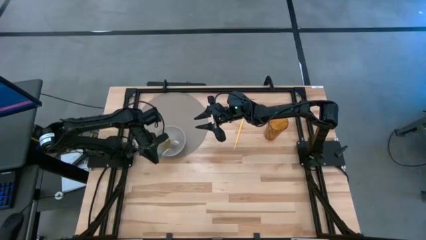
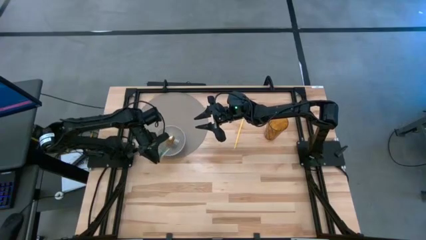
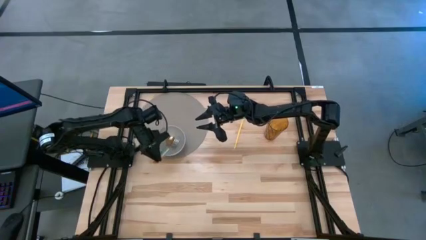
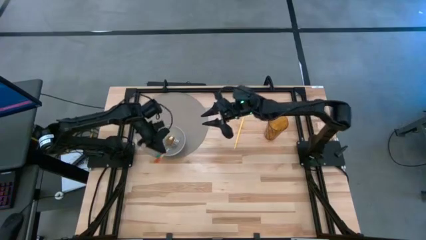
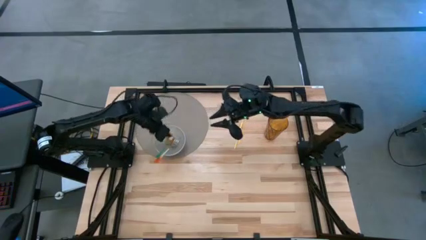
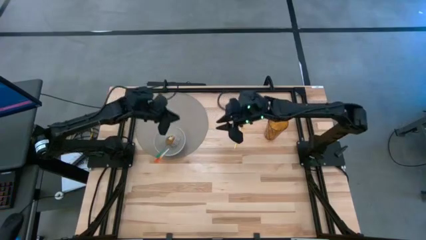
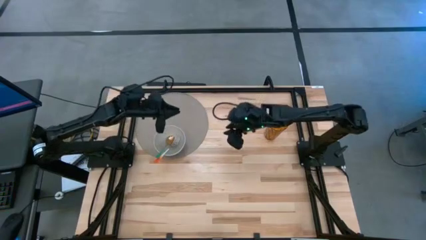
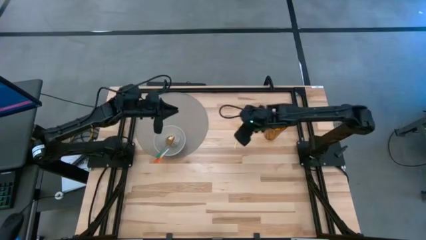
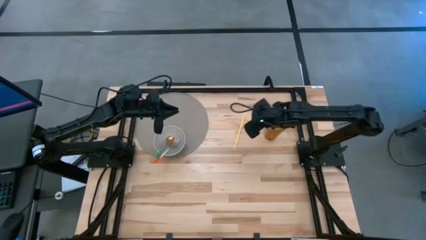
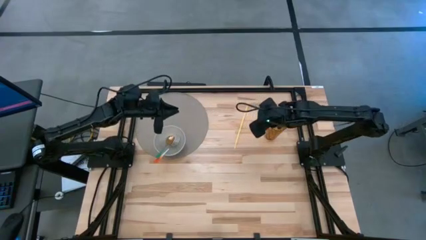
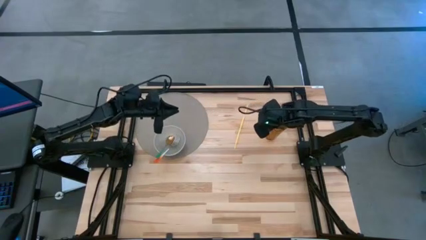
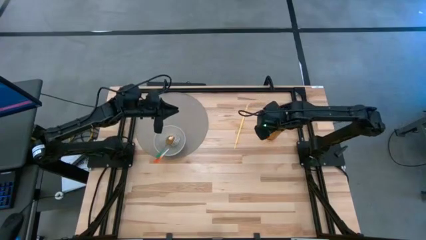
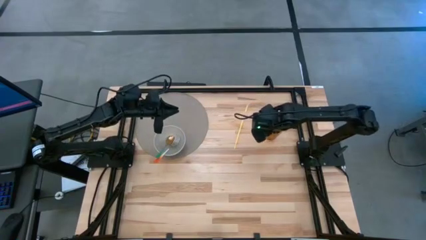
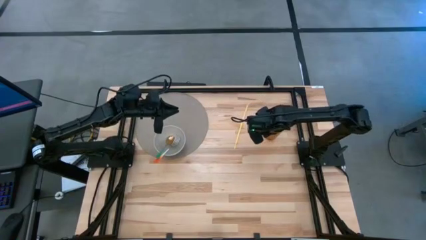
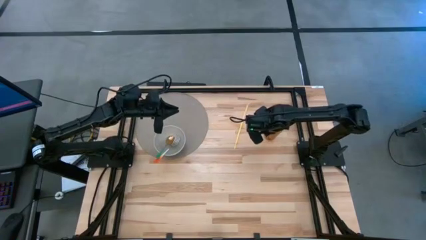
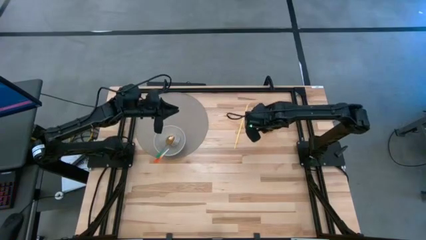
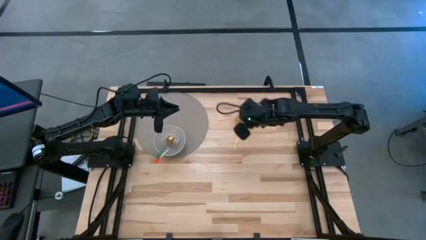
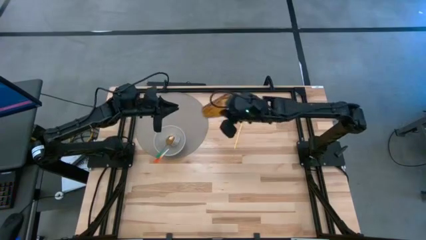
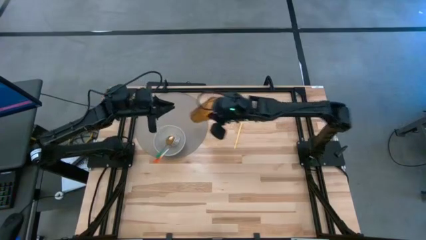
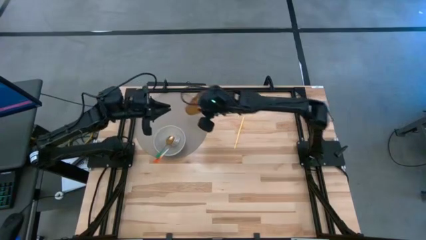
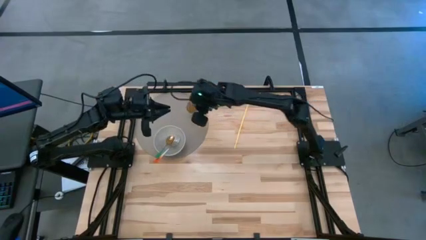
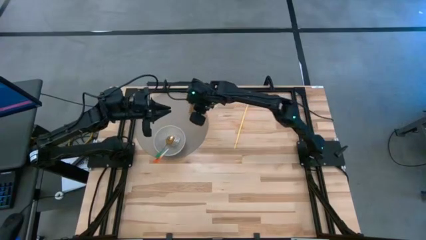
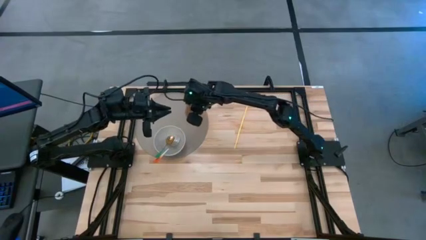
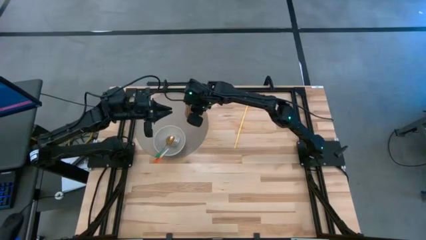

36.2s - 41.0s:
Task: Pick & Place Utensil
Put the brown cup to the top right of the gray bowl on the gray mat

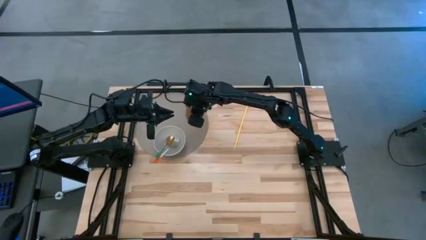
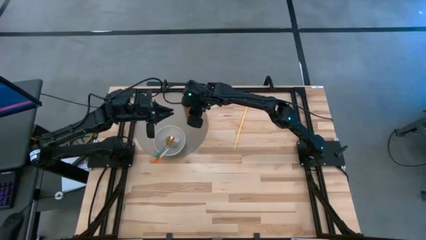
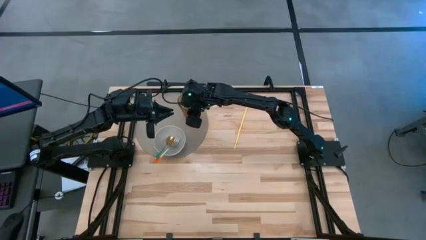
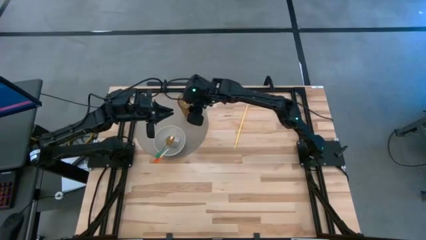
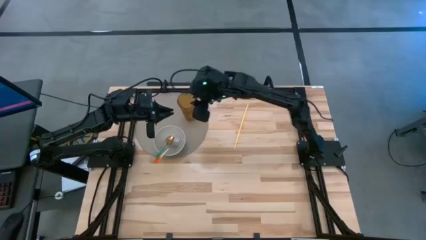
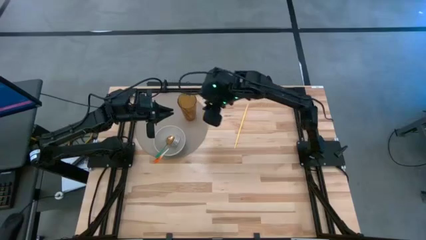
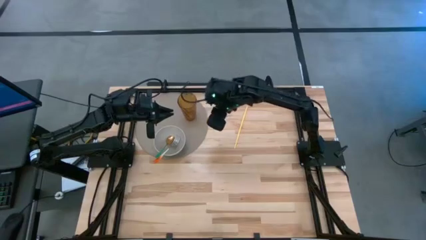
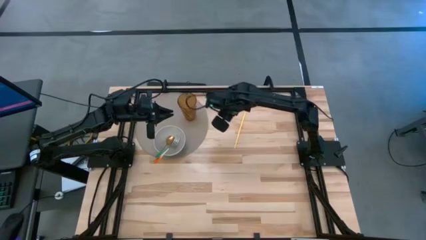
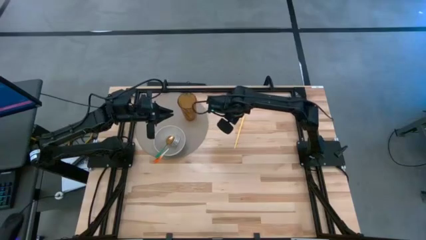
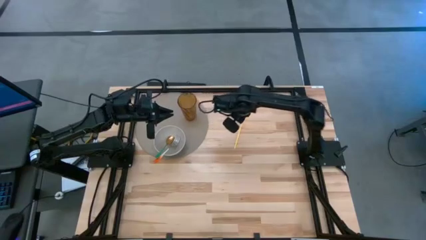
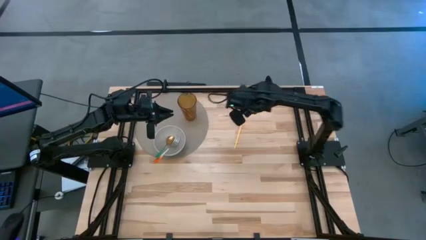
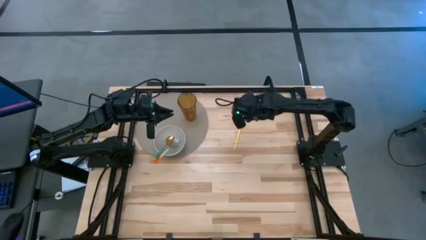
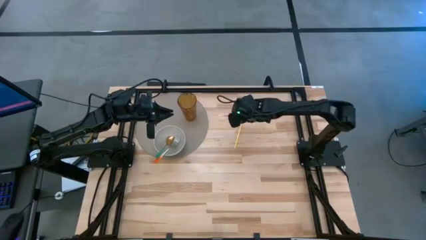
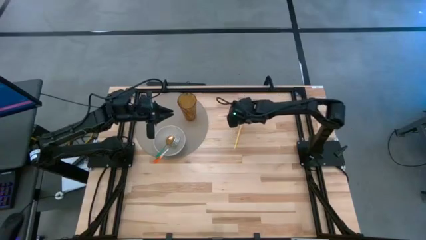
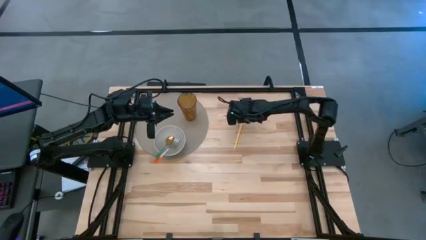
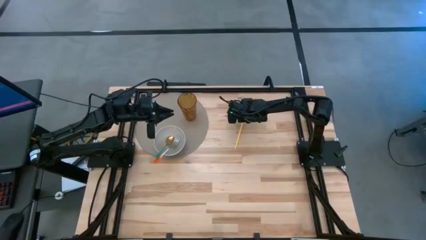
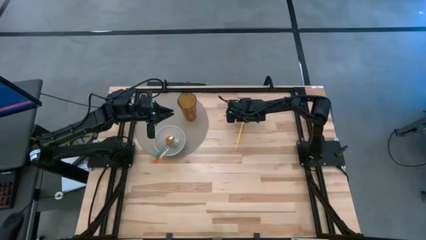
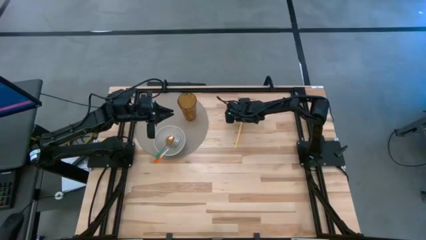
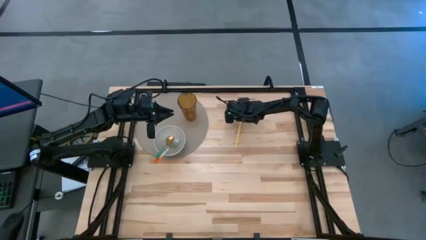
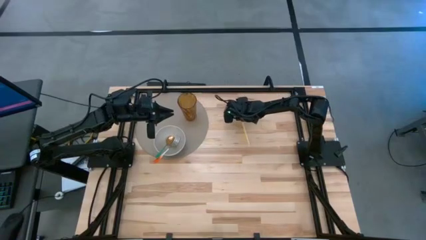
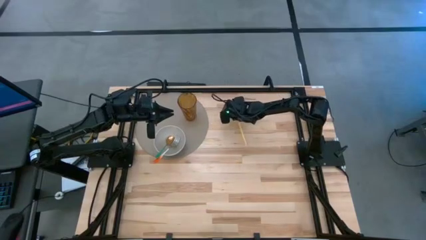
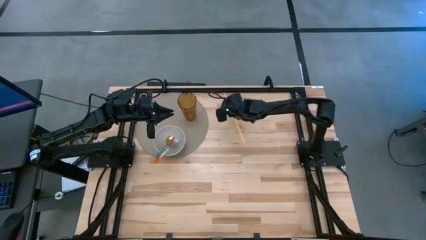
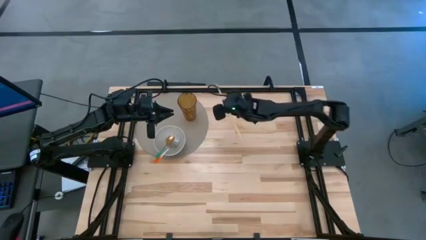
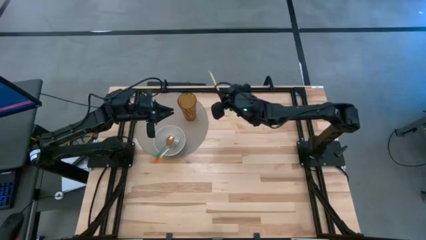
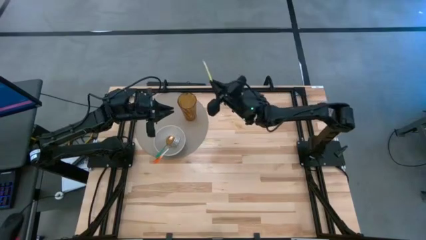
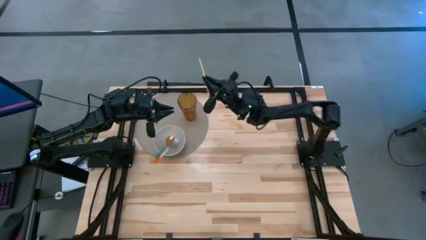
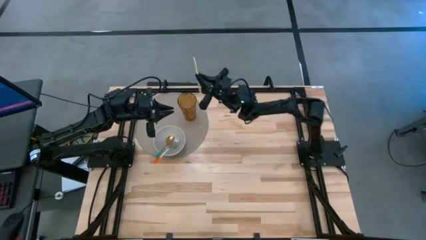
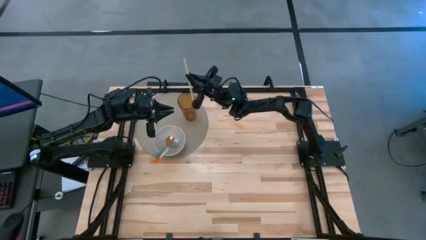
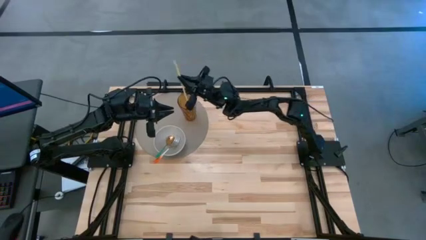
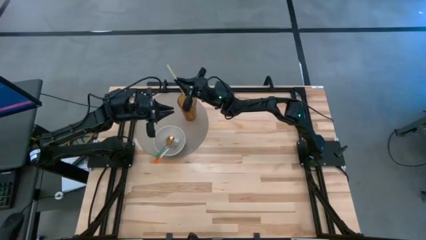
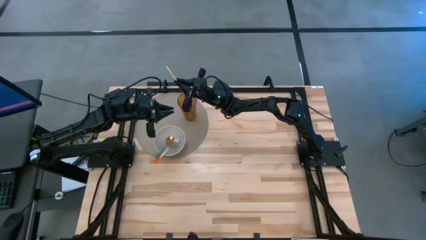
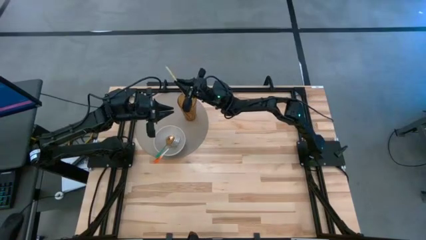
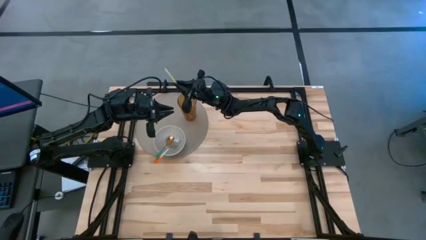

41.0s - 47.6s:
Put the yellow straw into the brown cup on the gray mat
